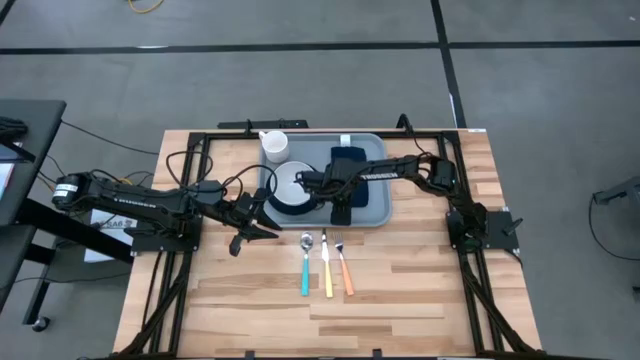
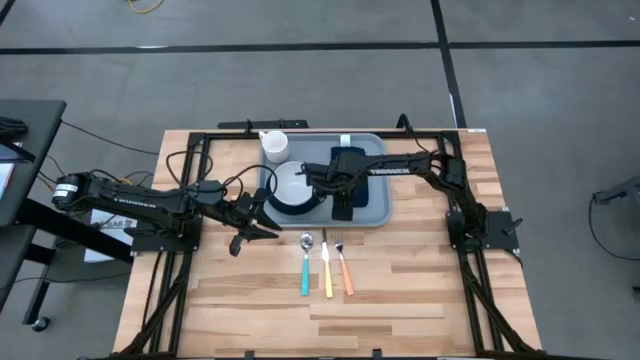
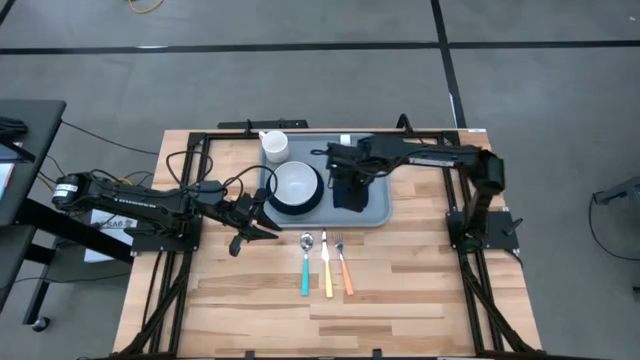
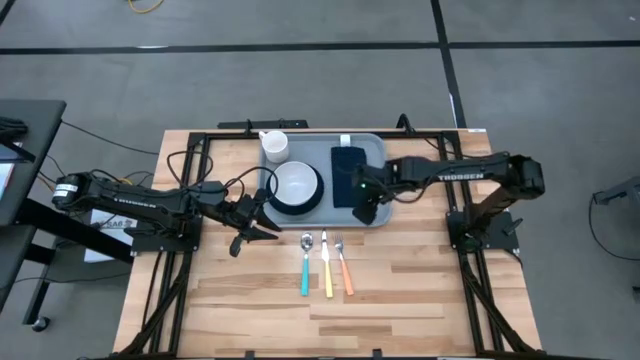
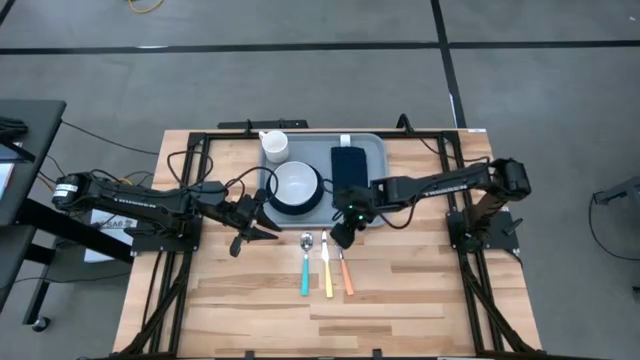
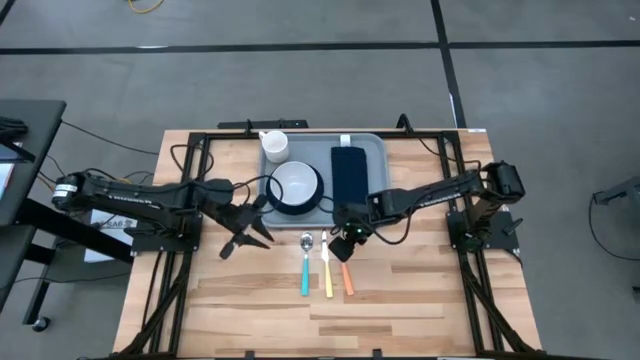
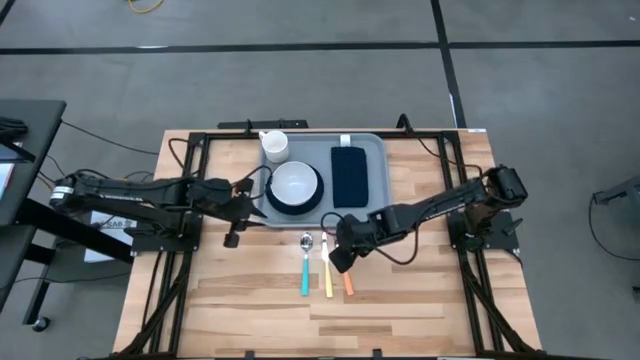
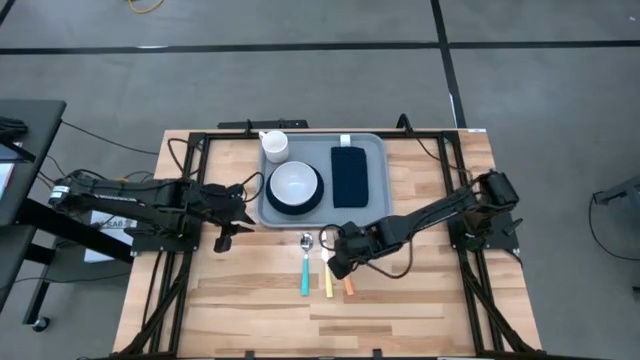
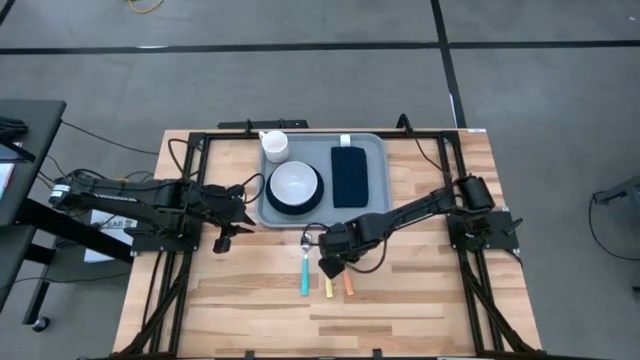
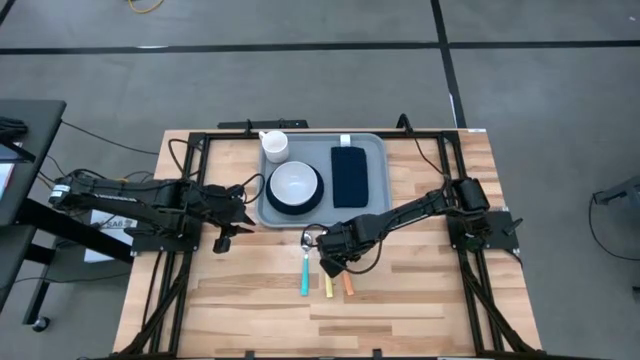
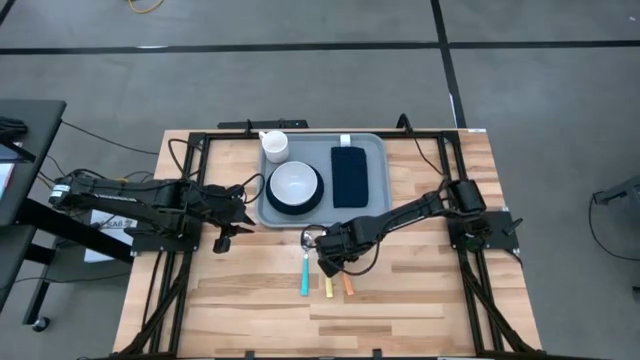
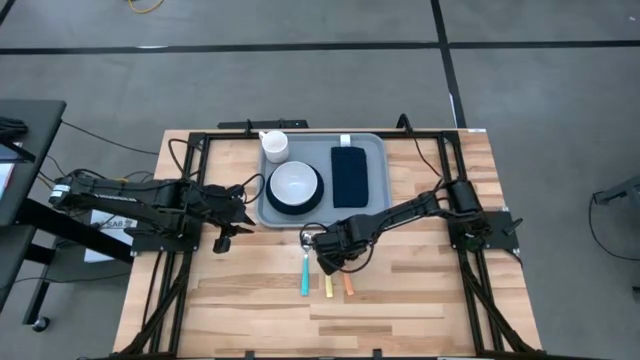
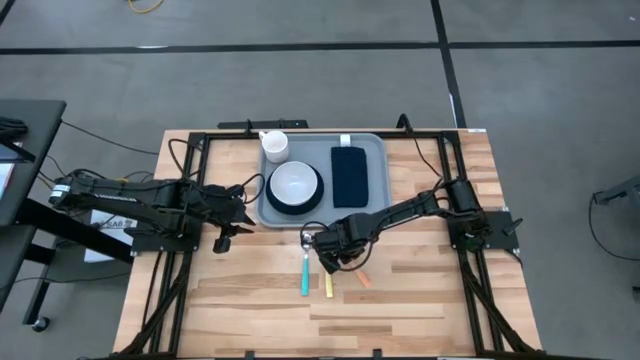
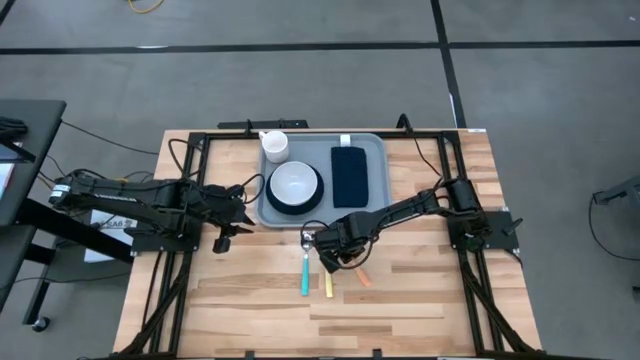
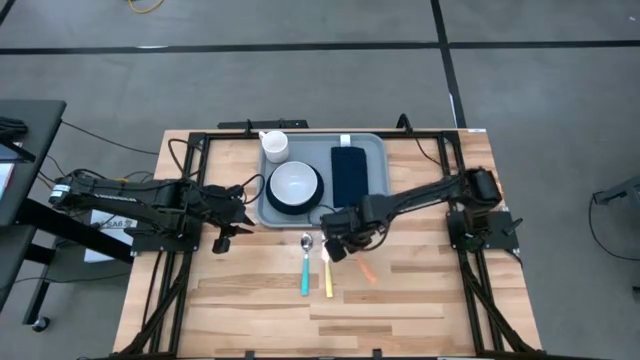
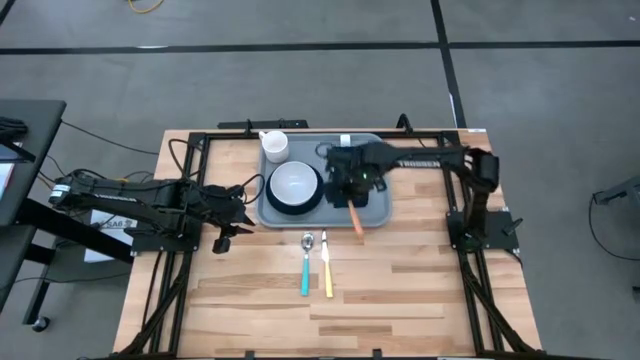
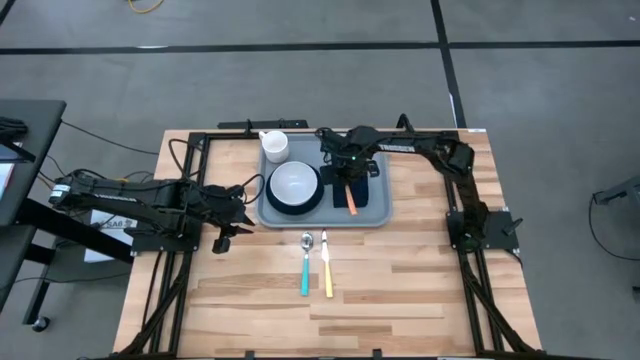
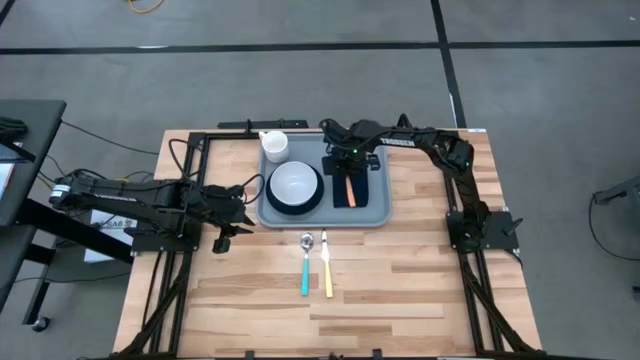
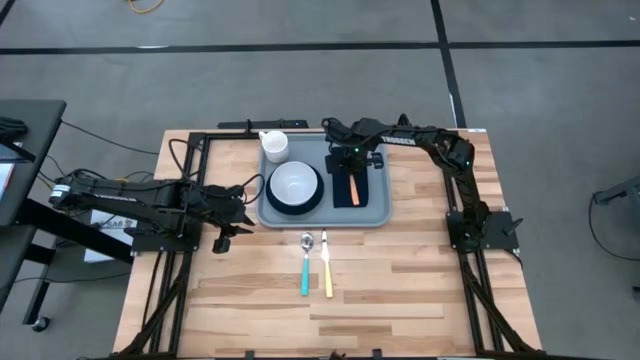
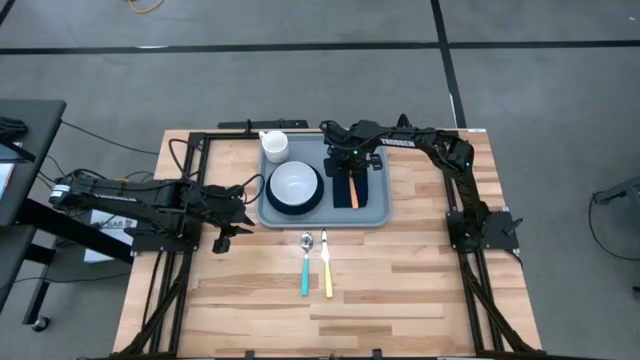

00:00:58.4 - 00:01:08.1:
Task: Set up tray
Put the orange fork on the dark blue napkin

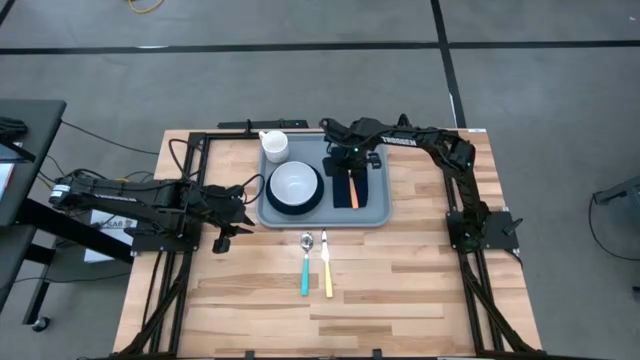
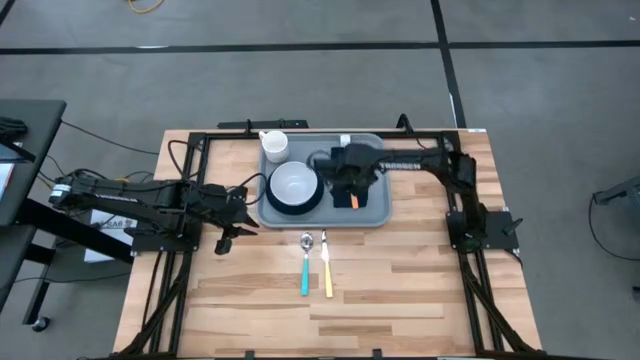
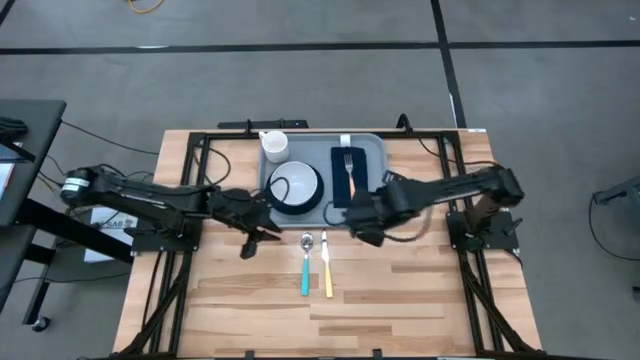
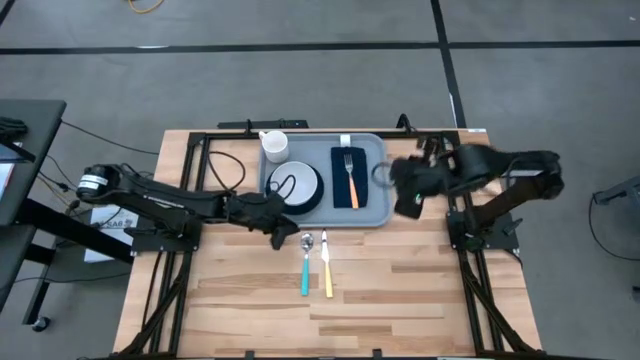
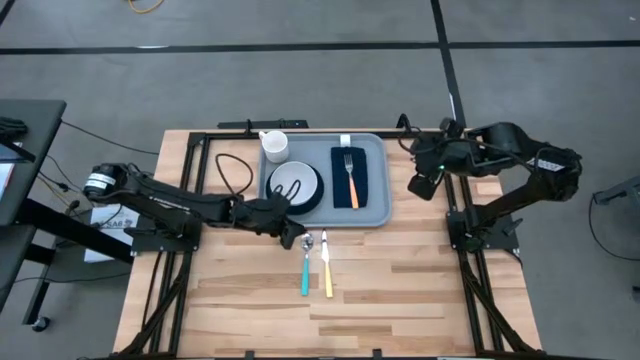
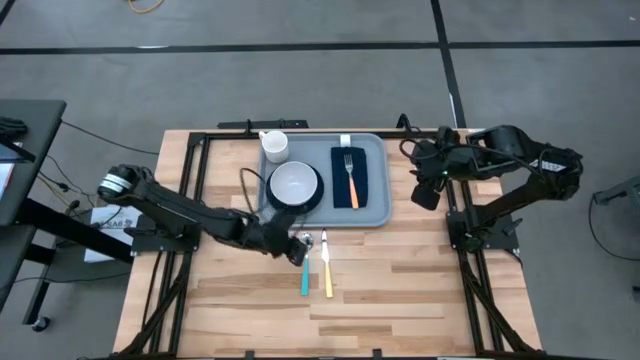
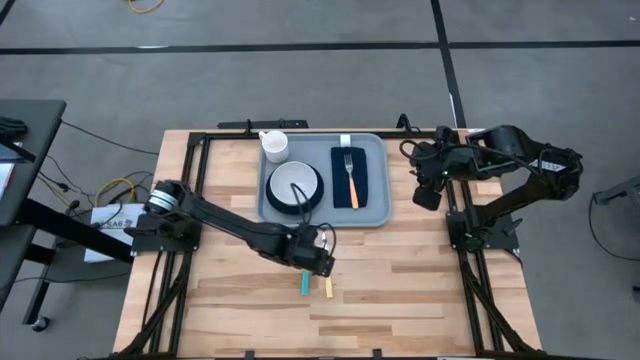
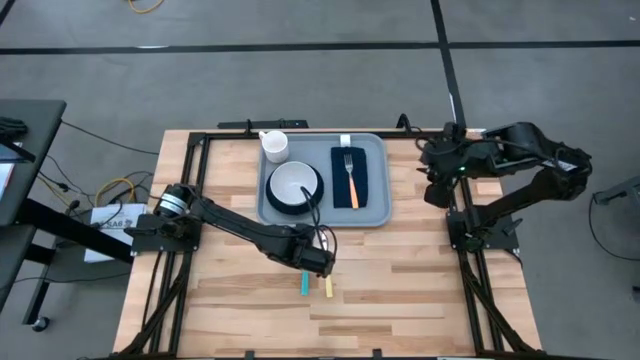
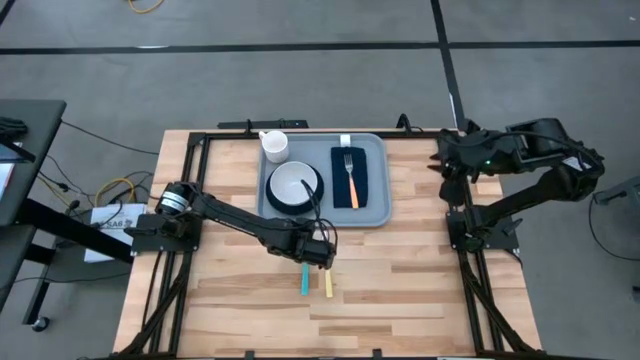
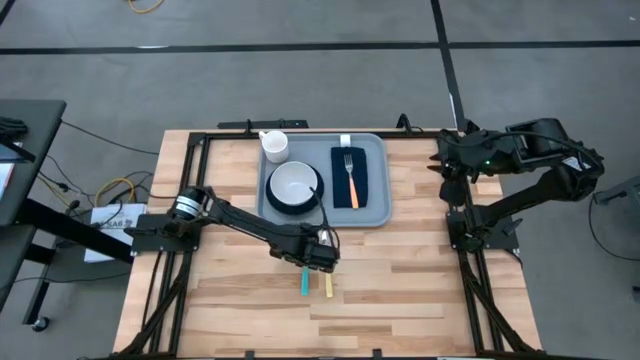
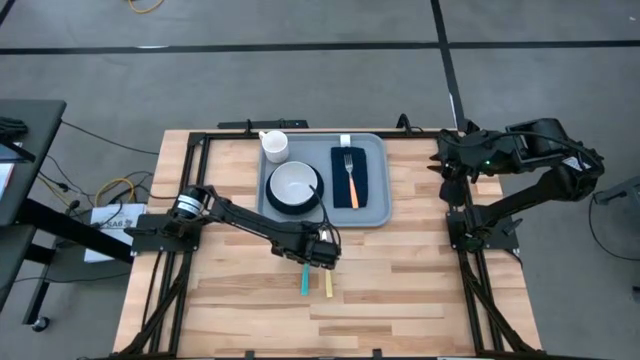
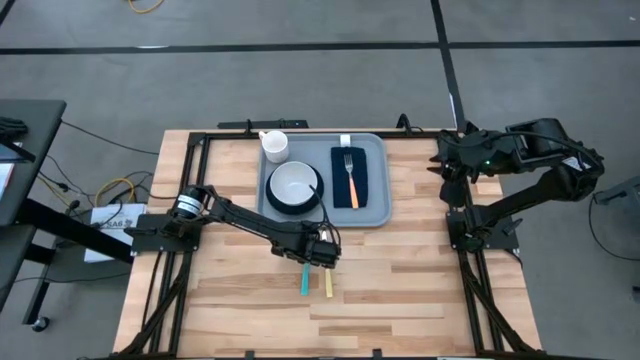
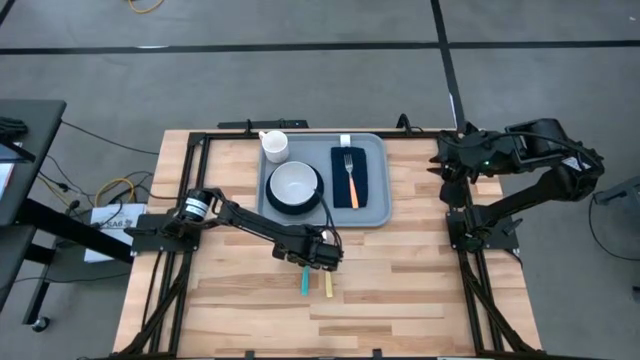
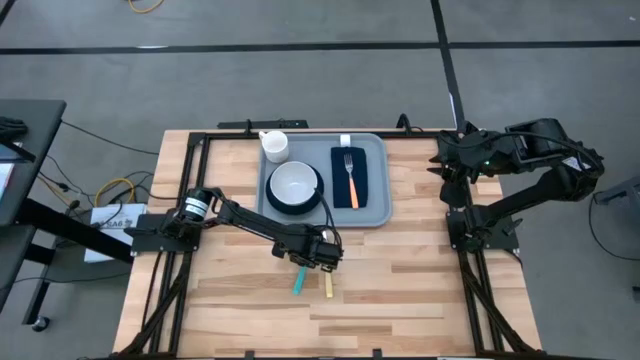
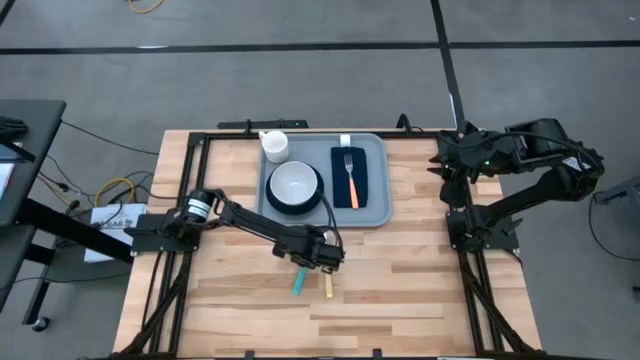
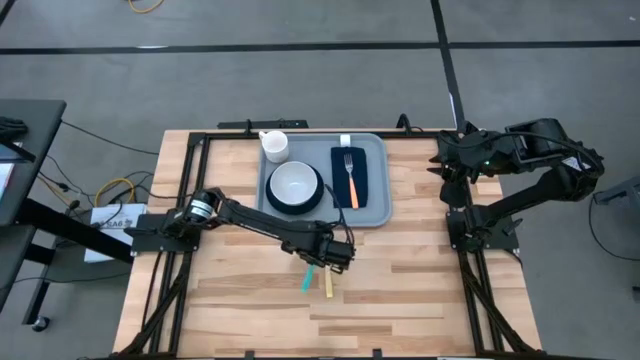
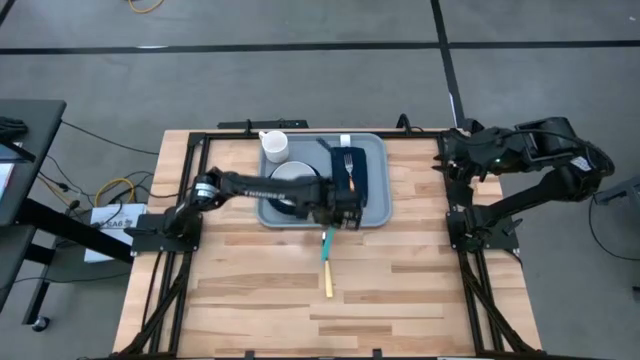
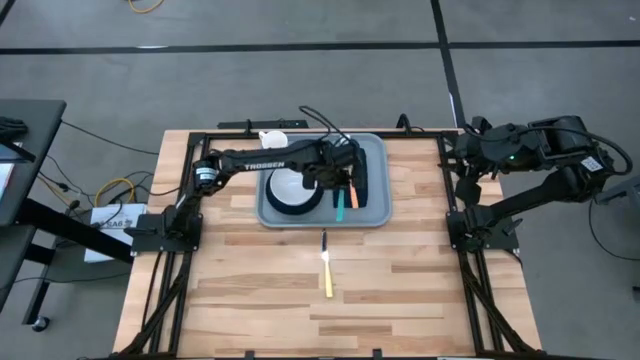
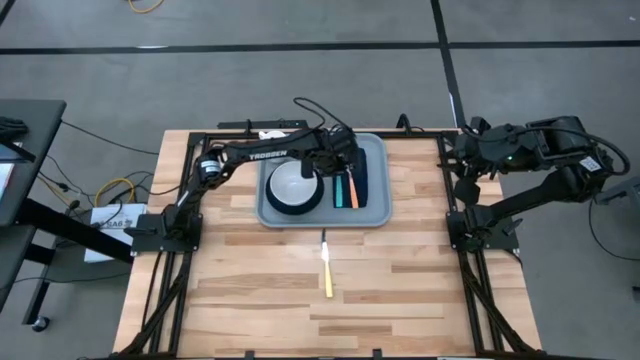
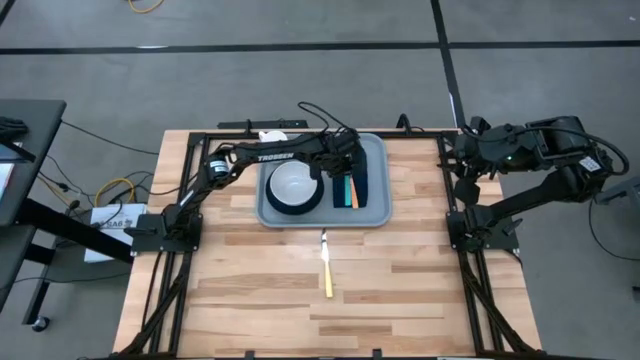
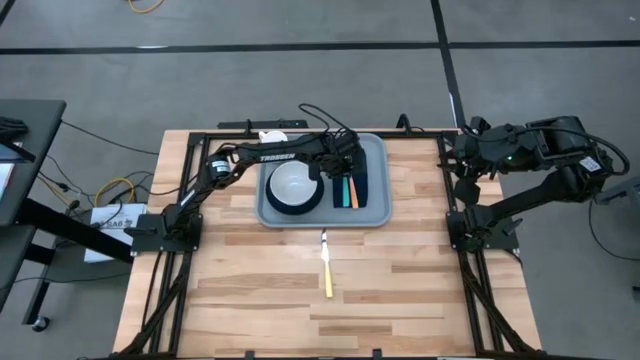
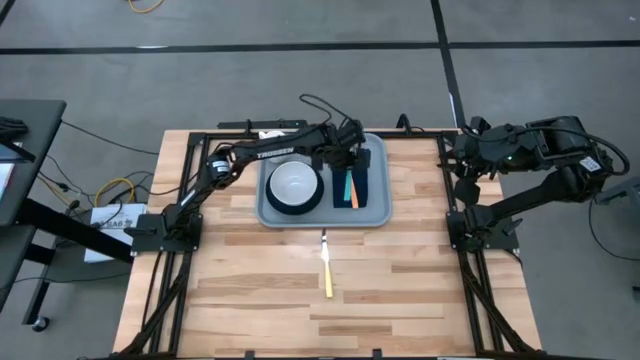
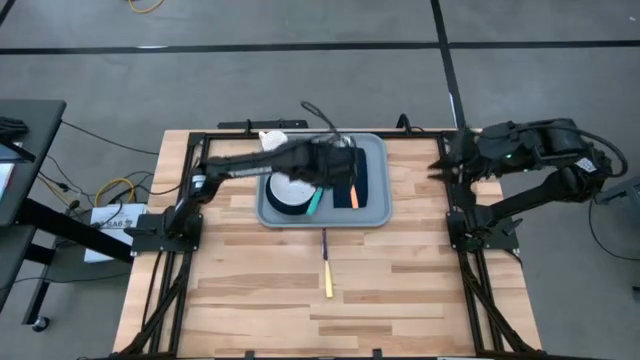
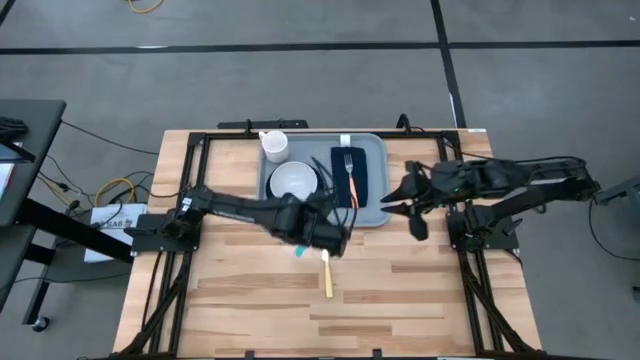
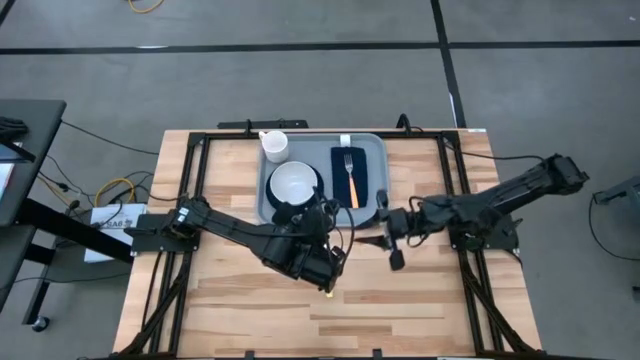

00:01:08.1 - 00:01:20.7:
Put the blue spoon on the dark blue napkin to the left of the orange fork
